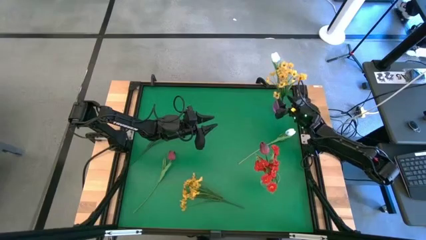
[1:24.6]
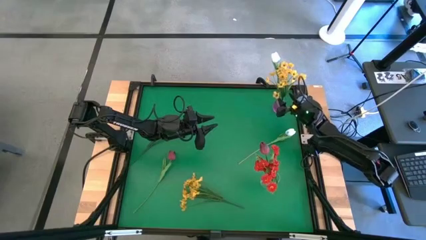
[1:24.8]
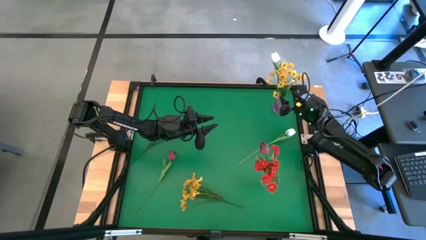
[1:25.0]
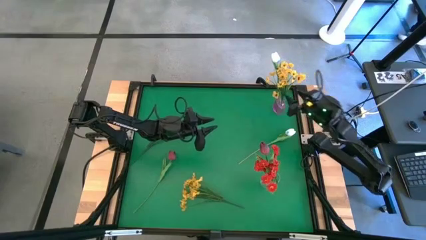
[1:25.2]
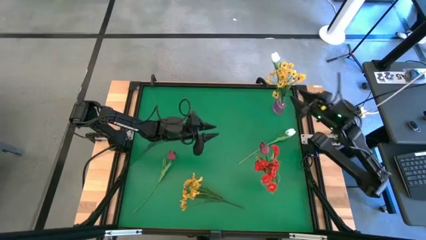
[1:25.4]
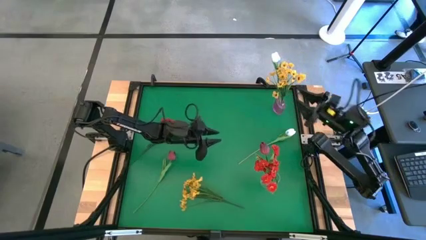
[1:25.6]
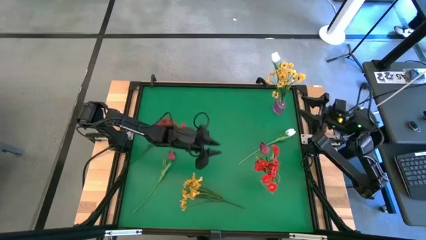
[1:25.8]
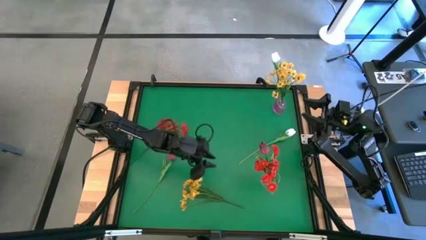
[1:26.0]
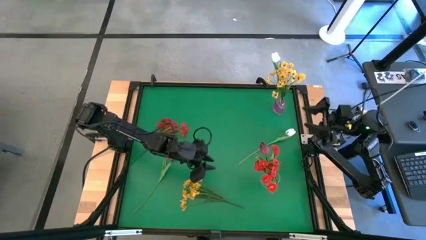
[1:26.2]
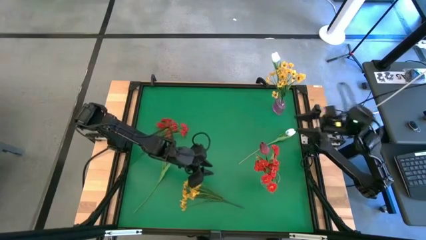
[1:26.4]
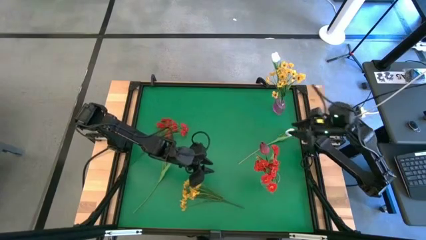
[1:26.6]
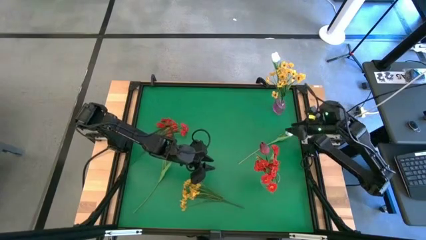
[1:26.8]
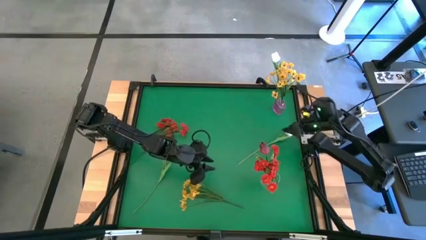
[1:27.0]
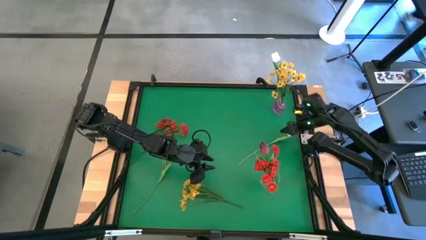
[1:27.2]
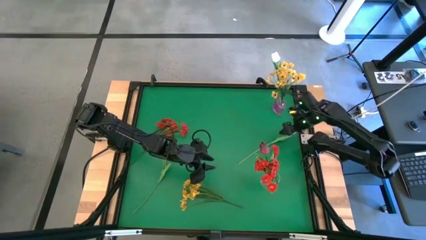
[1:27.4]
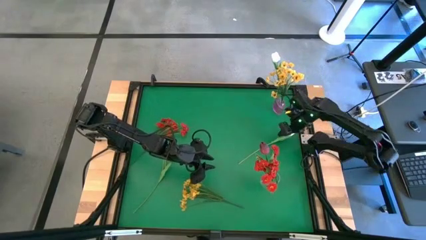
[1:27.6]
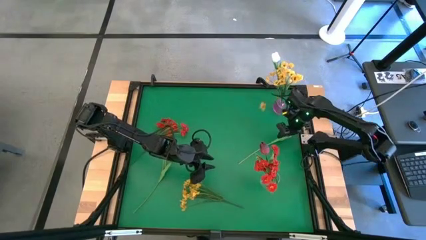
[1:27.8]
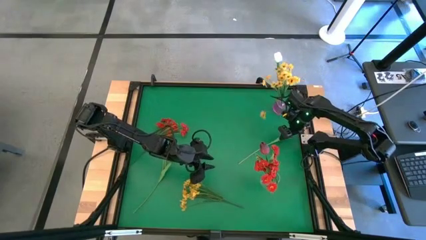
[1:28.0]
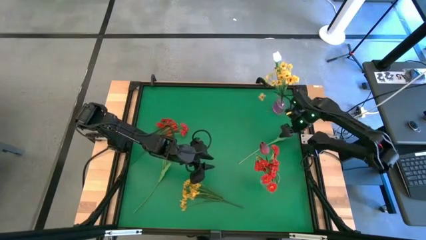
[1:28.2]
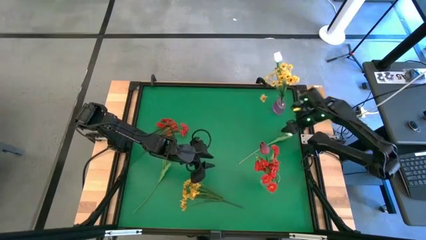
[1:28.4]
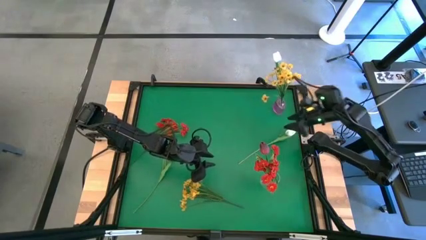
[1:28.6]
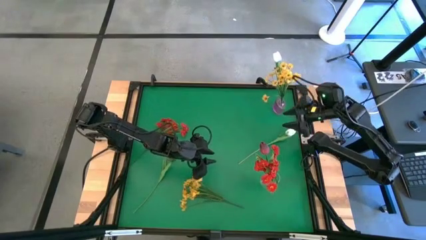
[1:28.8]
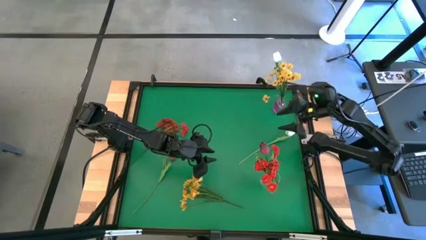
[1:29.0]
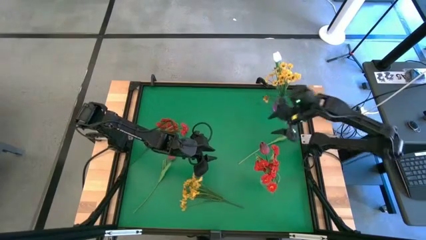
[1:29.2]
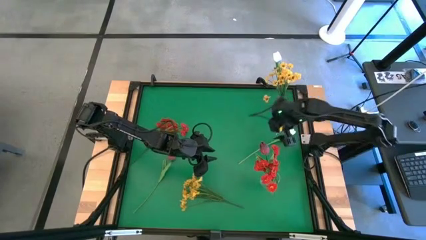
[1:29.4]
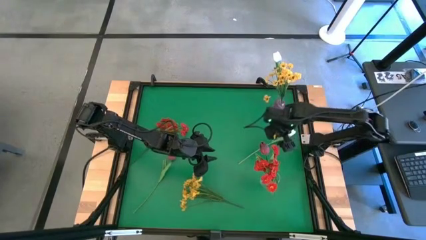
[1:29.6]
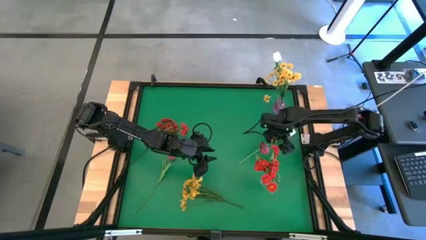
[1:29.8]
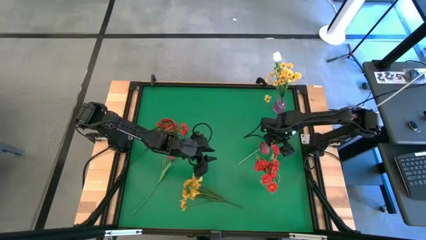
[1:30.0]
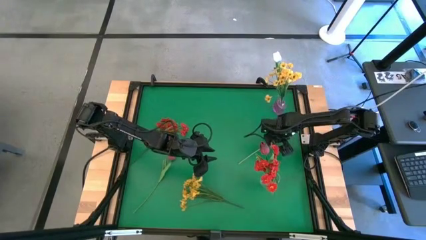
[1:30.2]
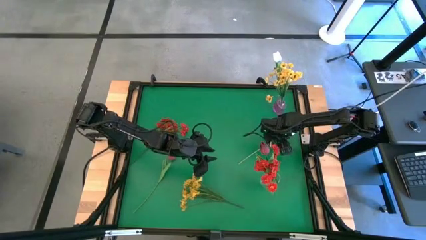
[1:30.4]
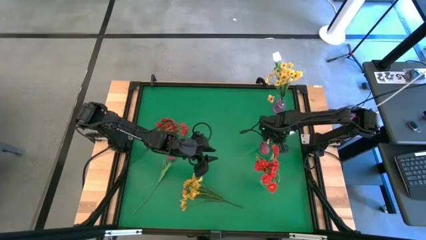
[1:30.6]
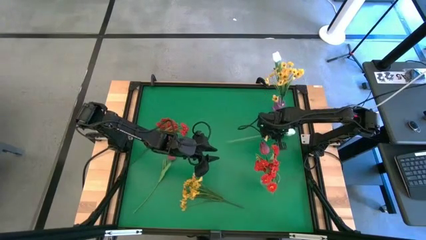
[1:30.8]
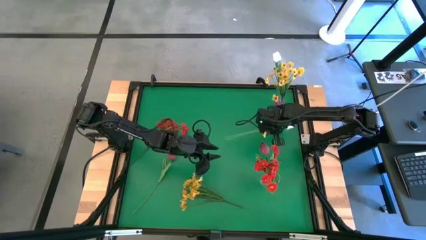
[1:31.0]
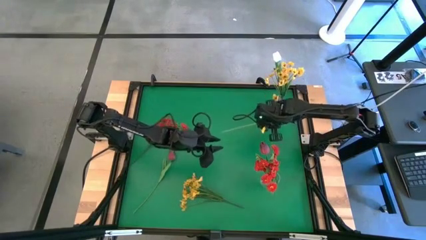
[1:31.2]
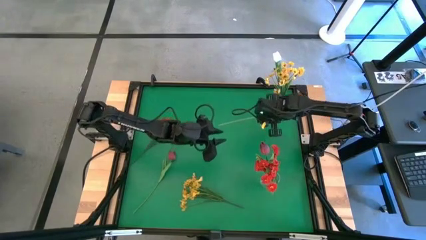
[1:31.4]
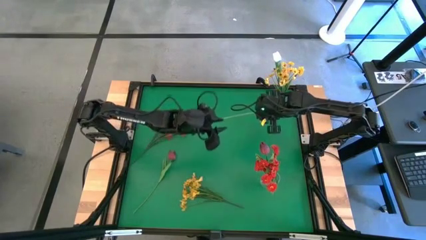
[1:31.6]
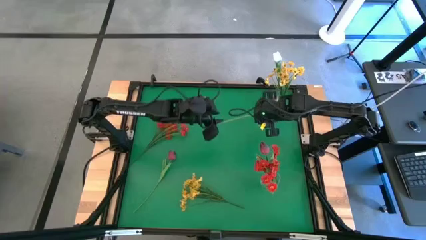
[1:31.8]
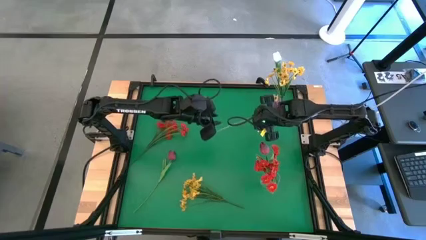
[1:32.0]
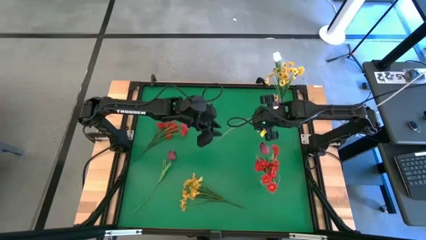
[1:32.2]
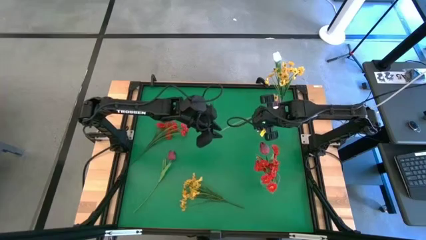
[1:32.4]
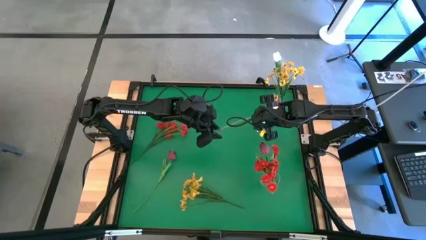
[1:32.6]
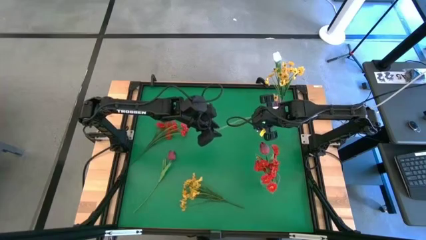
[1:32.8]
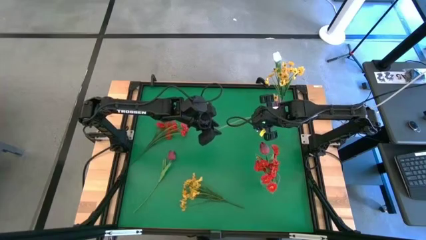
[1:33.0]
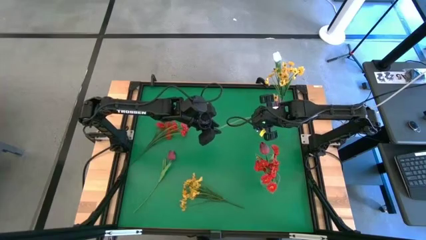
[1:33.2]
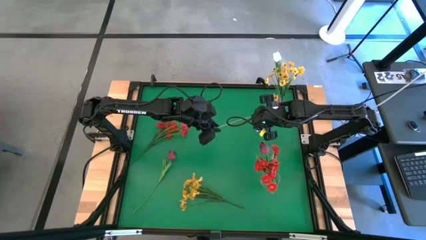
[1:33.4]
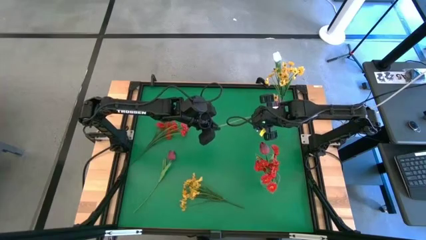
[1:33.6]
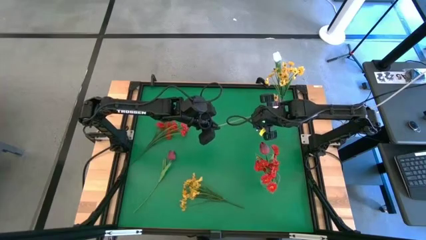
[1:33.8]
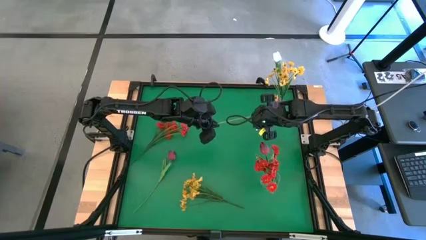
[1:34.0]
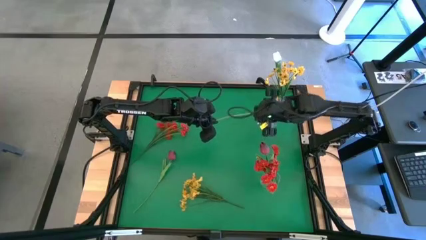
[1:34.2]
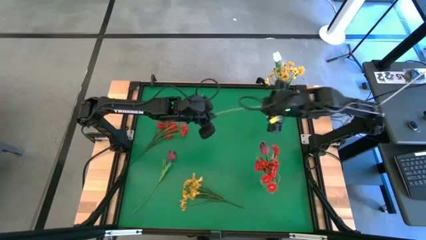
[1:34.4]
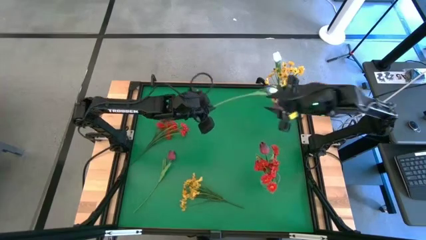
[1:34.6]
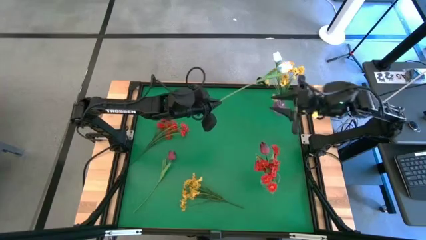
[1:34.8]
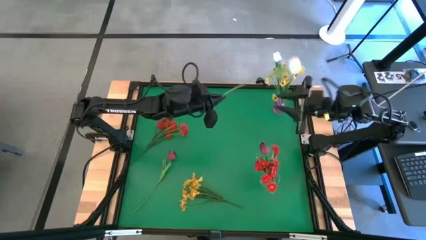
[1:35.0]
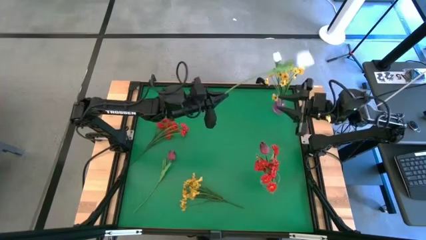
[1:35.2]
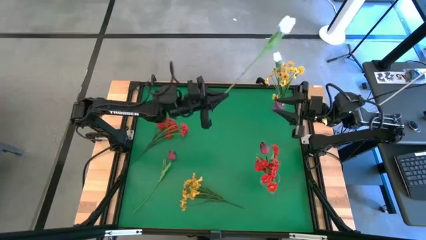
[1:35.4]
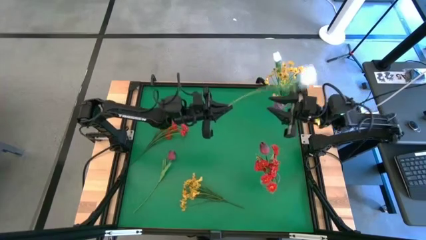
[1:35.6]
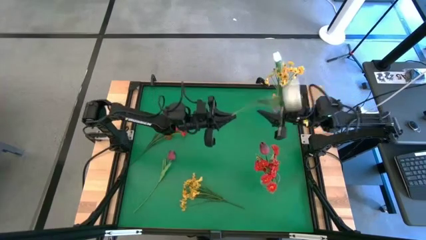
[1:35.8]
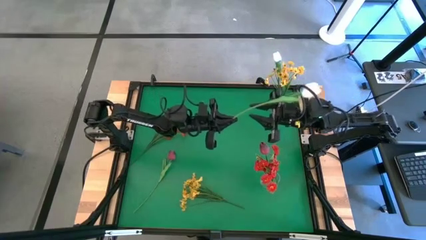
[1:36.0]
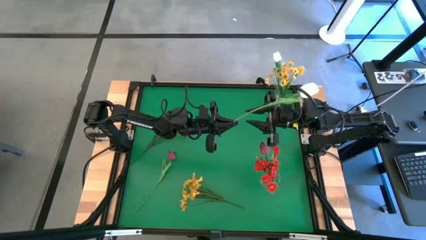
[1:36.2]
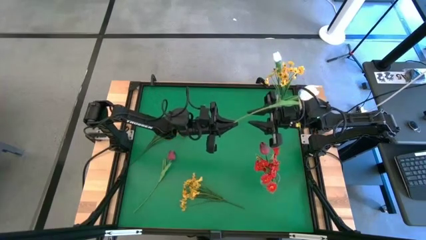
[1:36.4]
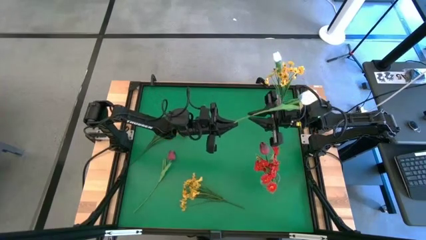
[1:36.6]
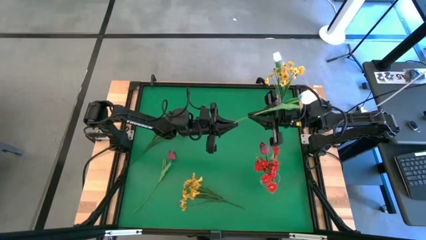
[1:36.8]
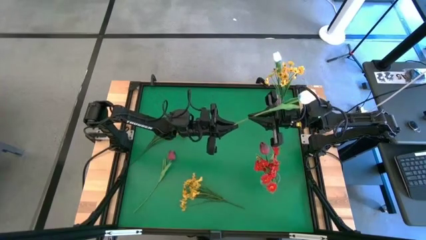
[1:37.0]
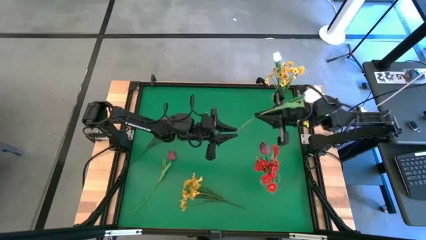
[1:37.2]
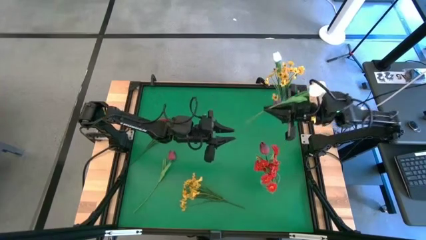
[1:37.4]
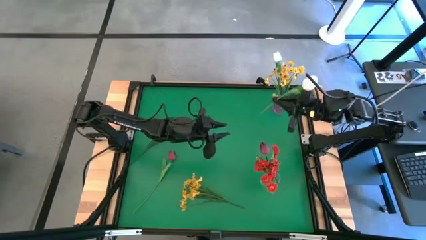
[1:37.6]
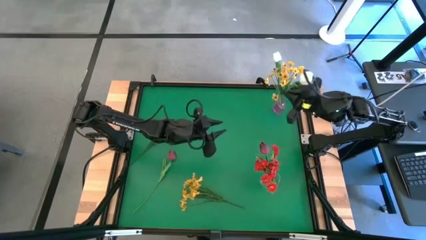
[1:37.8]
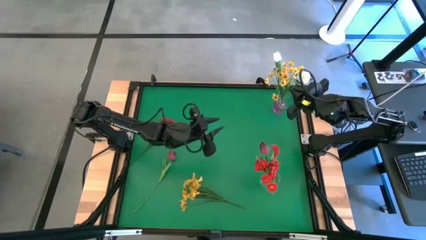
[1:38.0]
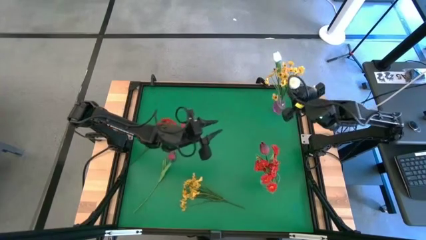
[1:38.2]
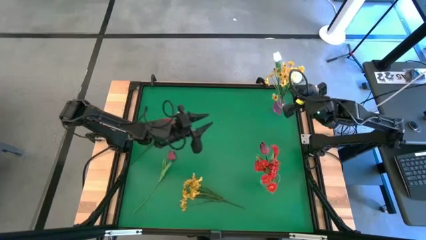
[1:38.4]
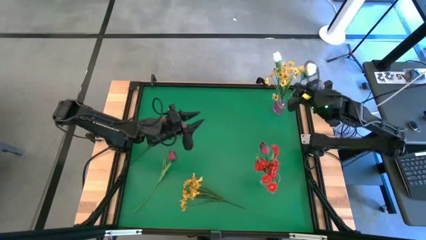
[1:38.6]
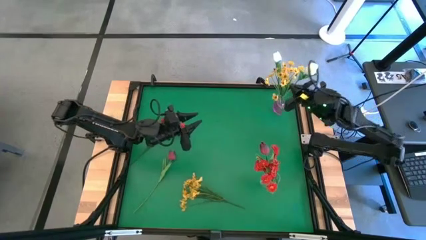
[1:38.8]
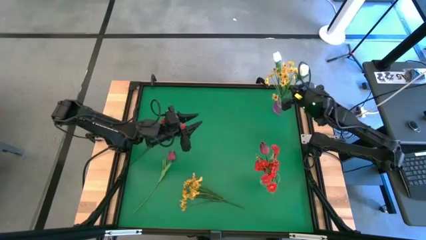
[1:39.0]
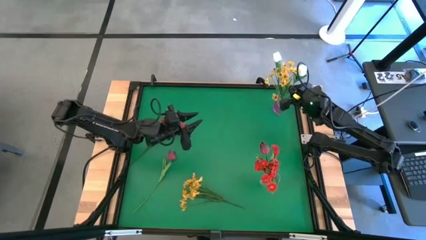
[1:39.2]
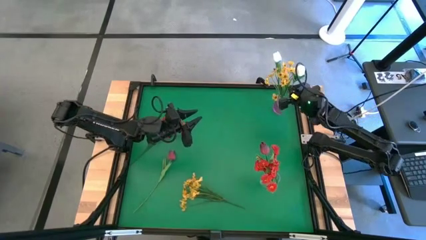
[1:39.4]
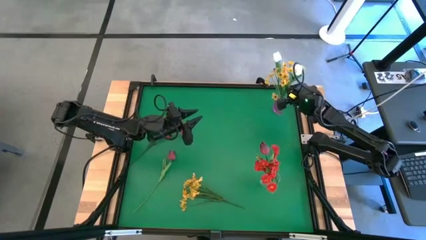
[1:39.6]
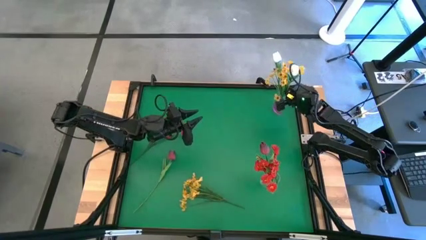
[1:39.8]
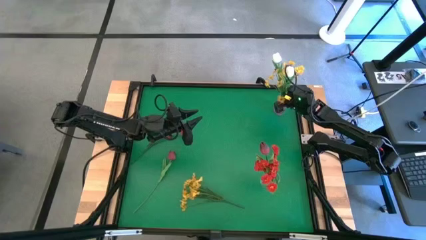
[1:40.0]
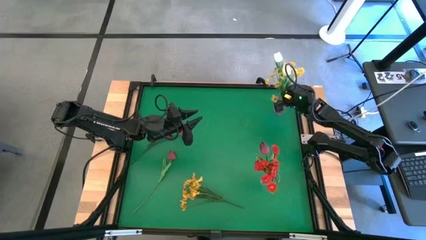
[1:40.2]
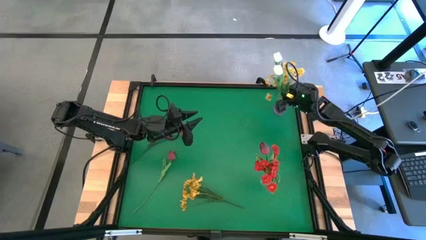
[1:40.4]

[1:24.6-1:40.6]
Task: Sort flowers into vase by color
Put the white tulips into the purple vase
